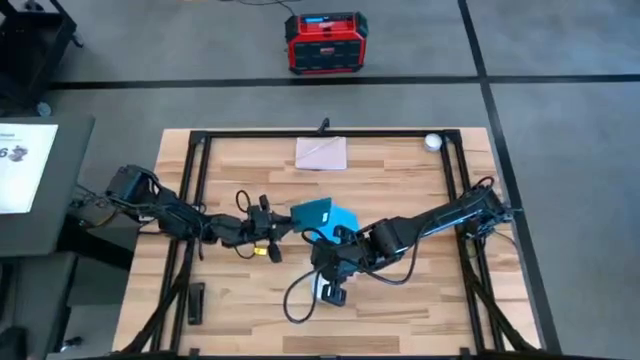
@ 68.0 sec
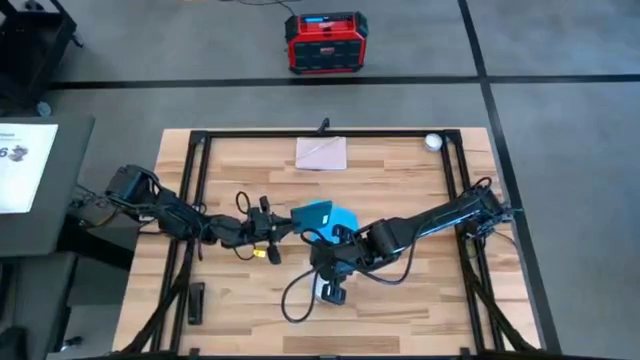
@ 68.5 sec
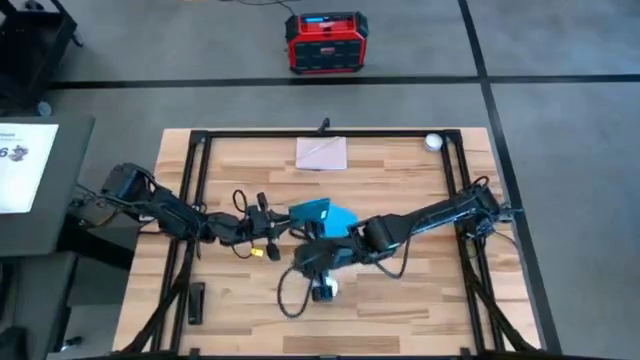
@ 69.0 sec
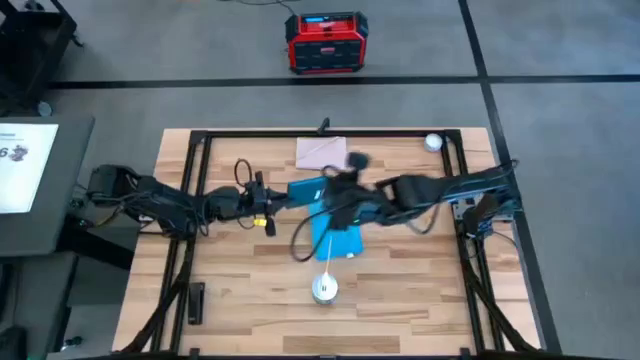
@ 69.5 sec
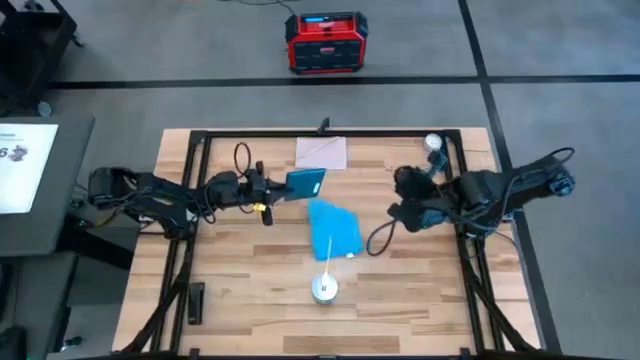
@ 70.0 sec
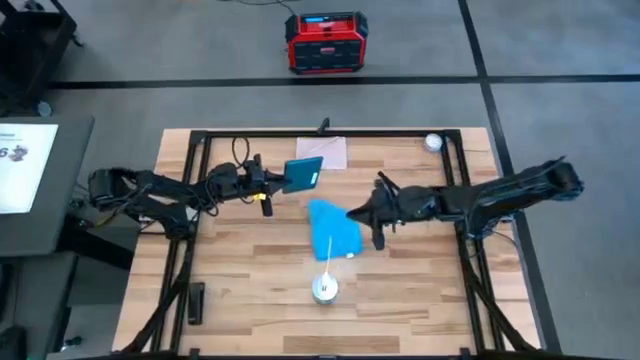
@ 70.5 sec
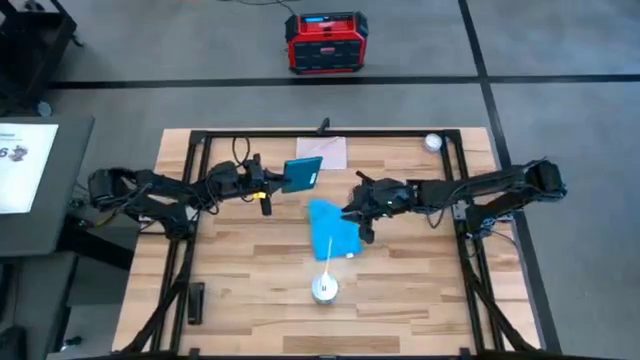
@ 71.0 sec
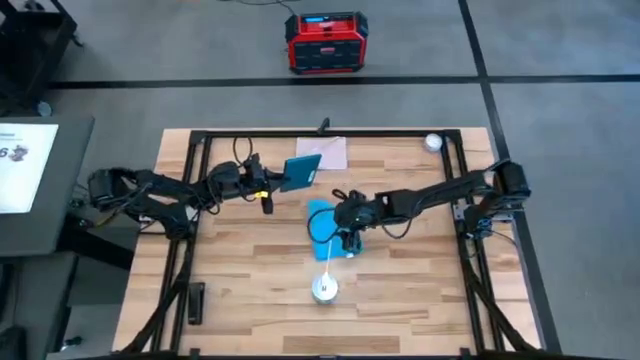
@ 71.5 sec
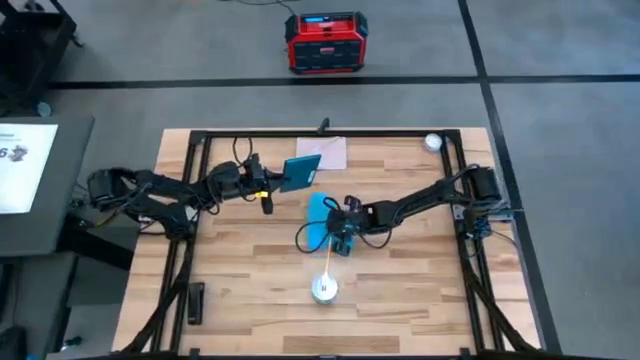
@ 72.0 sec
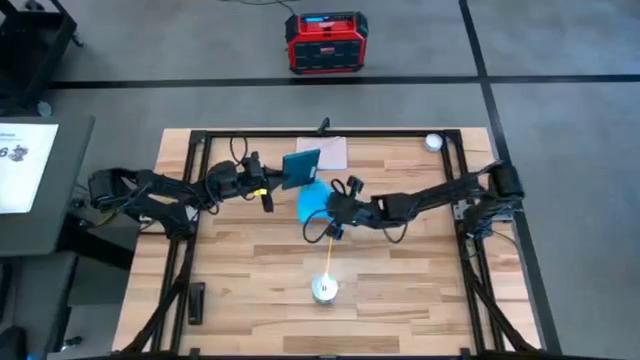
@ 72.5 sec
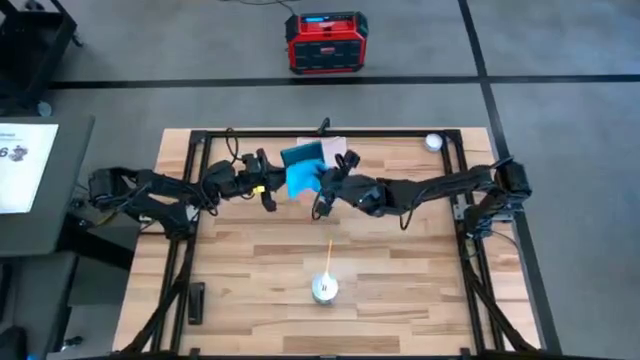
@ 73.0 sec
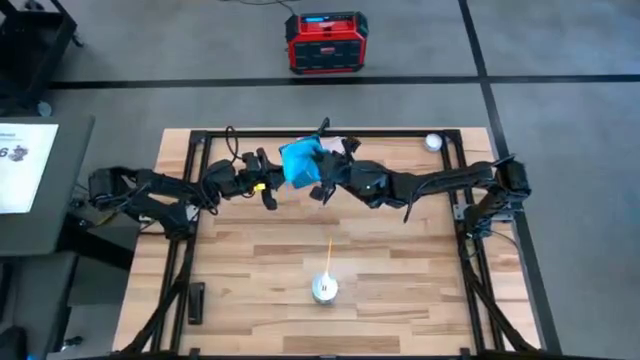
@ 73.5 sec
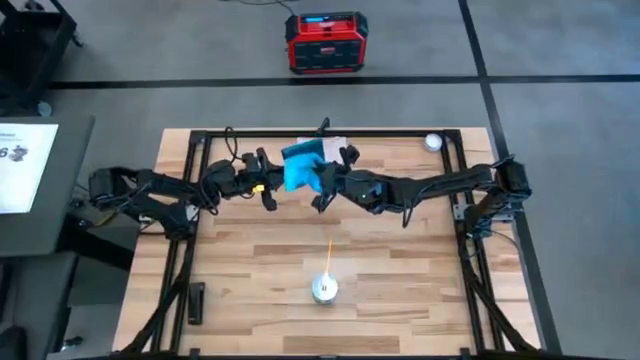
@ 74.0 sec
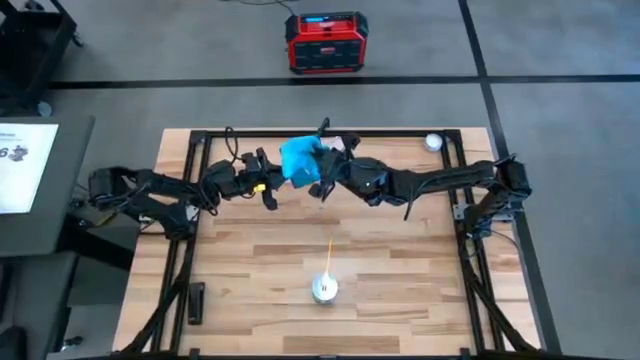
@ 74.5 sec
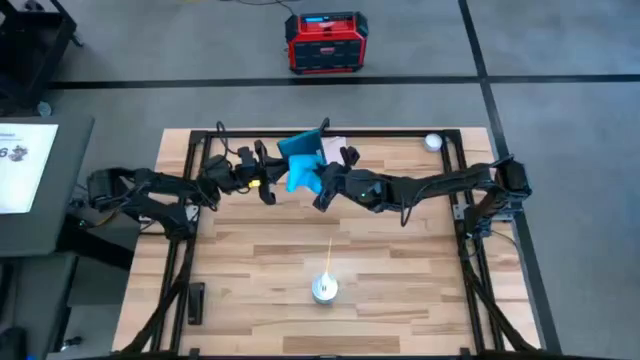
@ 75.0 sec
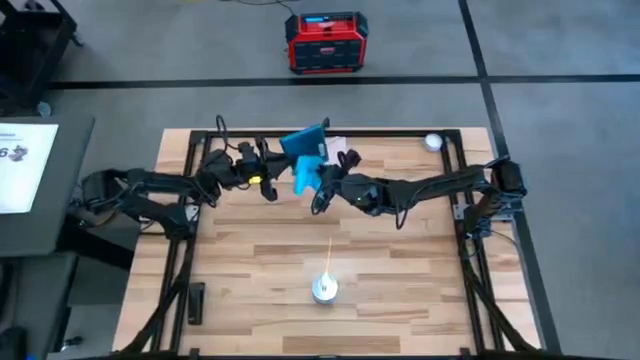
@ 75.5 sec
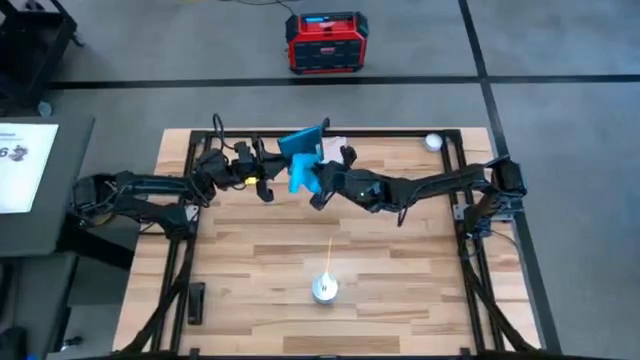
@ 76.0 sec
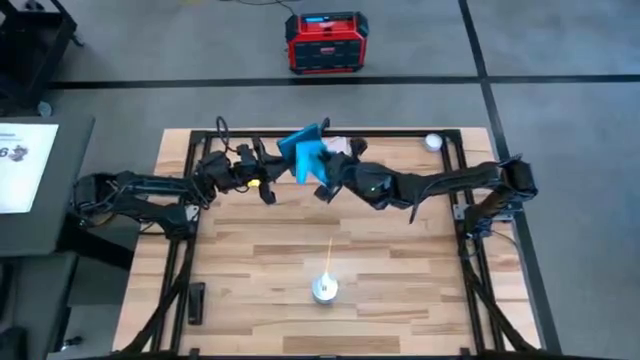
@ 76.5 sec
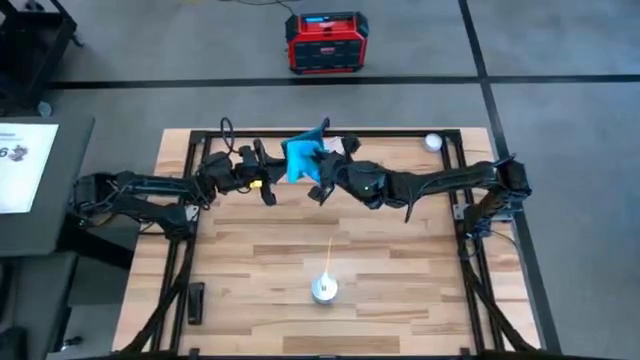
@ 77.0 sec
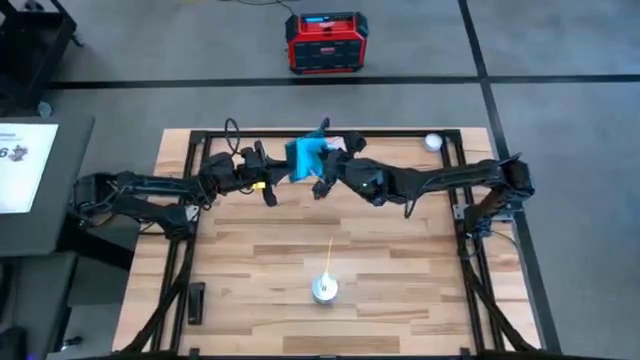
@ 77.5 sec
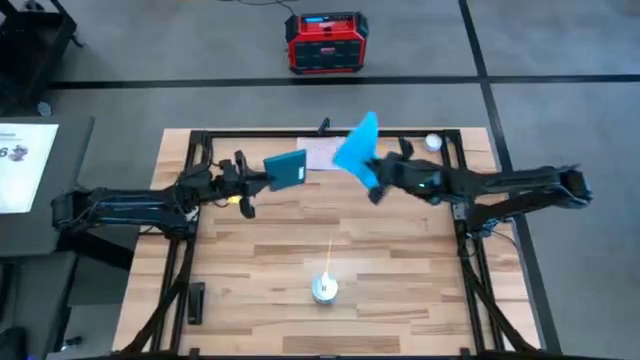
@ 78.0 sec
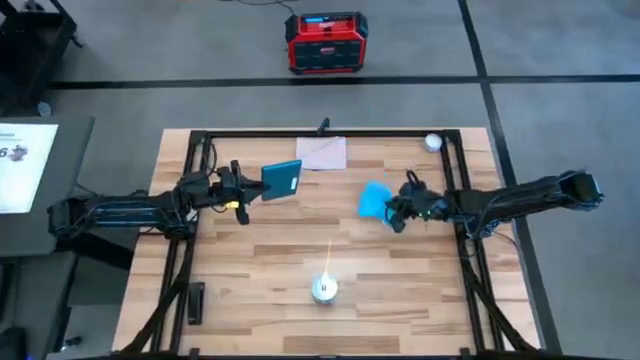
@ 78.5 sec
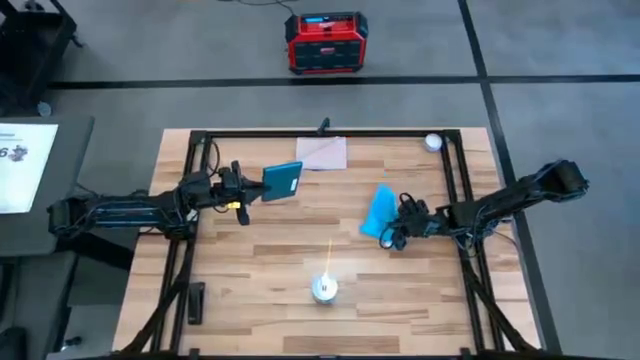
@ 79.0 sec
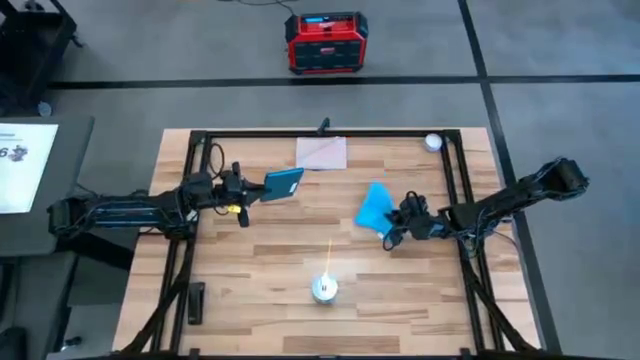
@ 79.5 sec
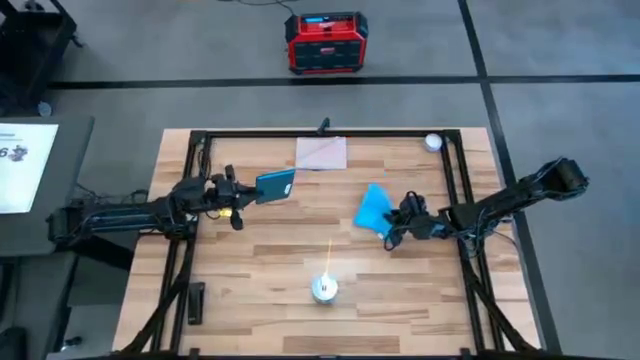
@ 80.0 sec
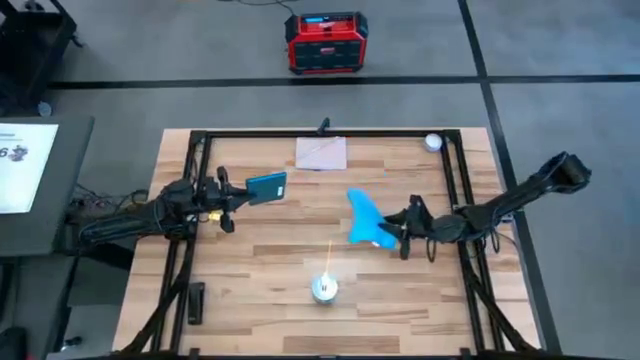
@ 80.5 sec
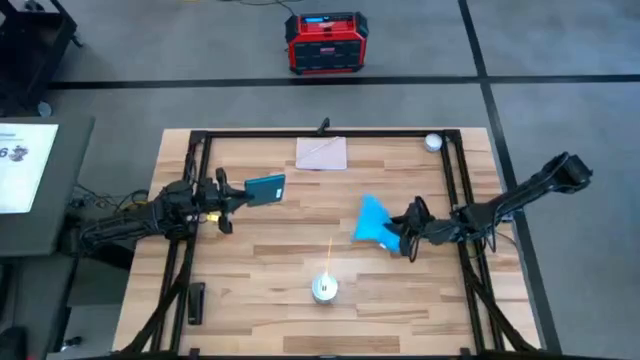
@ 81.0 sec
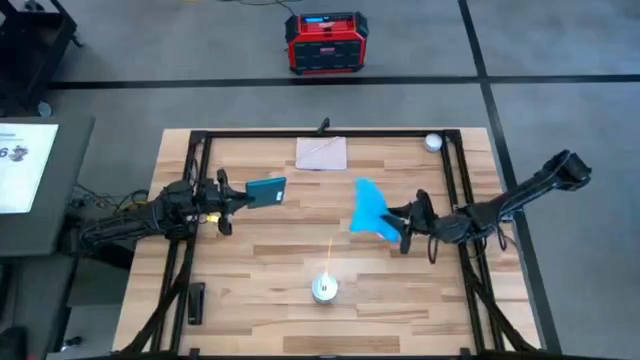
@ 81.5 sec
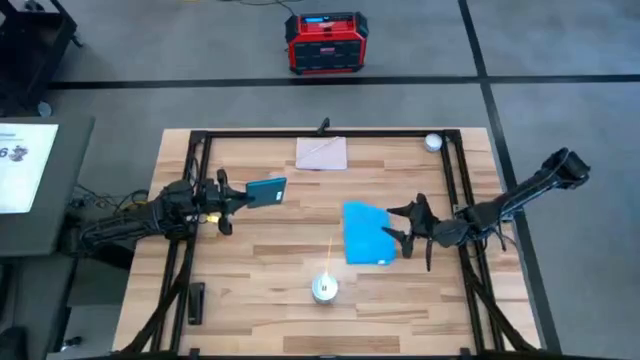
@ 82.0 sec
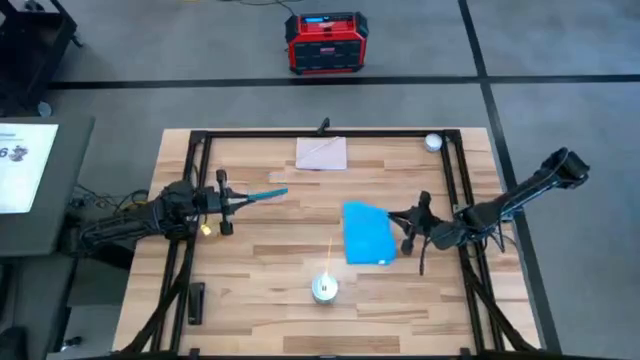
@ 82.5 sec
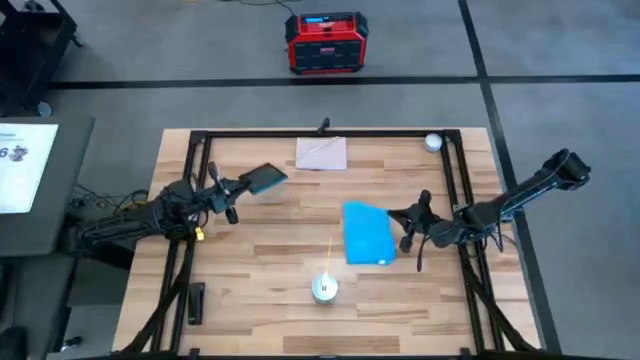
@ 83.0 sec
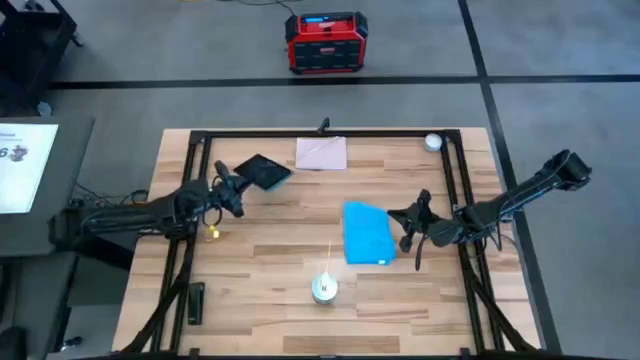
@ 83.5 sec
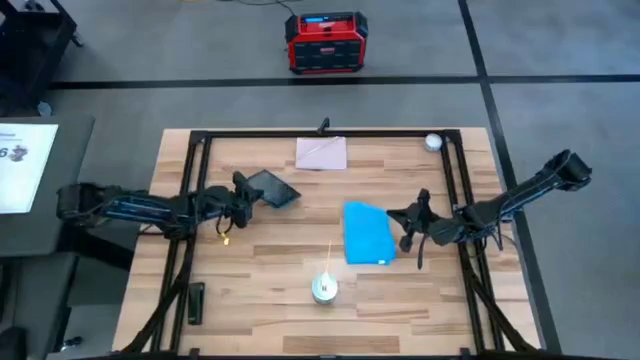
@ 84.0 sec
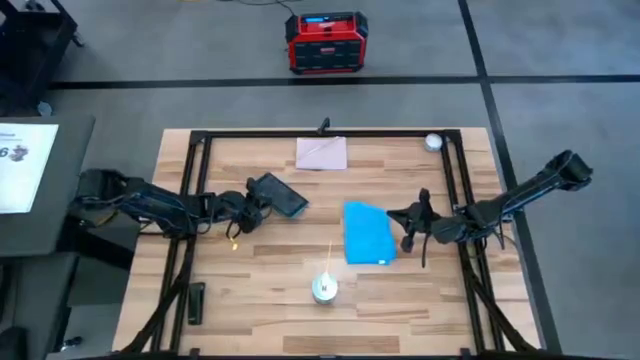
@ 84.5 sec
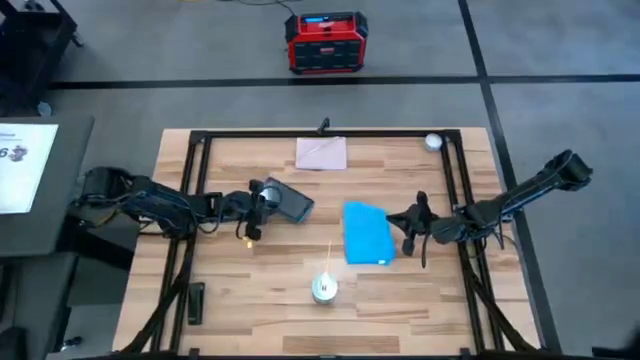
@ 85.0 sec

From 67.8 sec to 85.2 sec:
Task: Apply microfiber cloth
Wipe the back of the tablet with a blue microfiber cloth

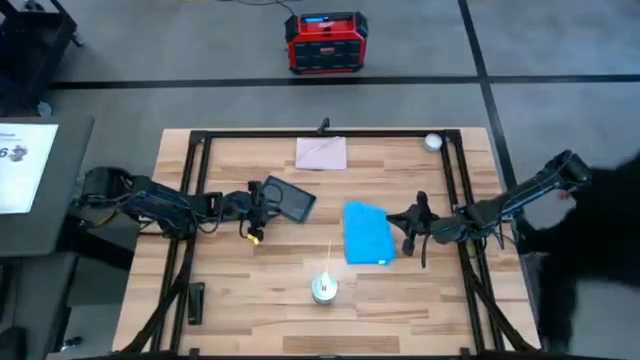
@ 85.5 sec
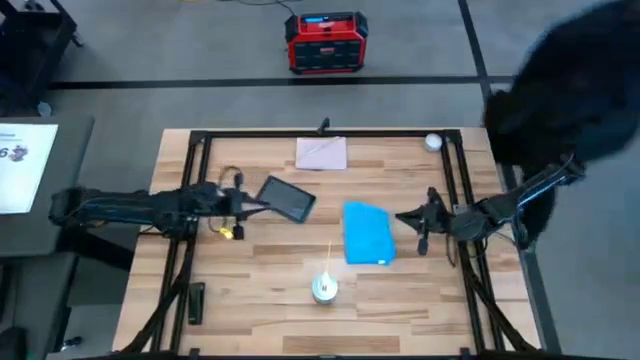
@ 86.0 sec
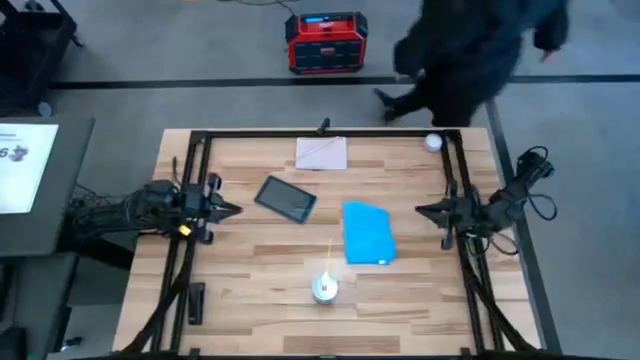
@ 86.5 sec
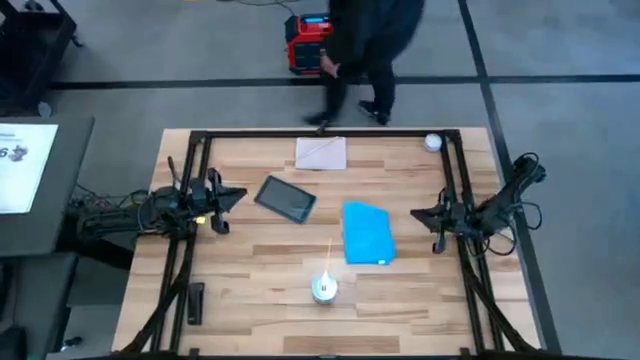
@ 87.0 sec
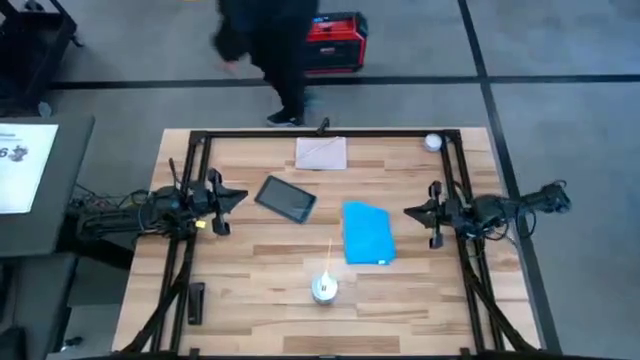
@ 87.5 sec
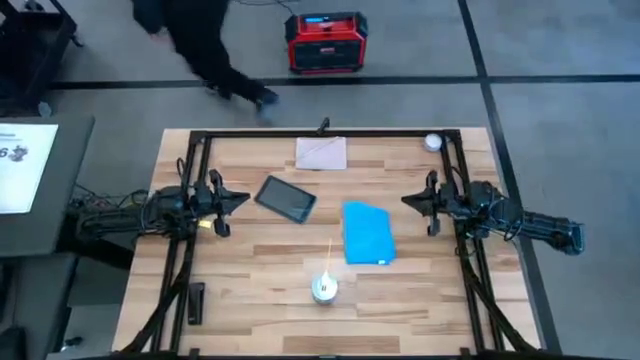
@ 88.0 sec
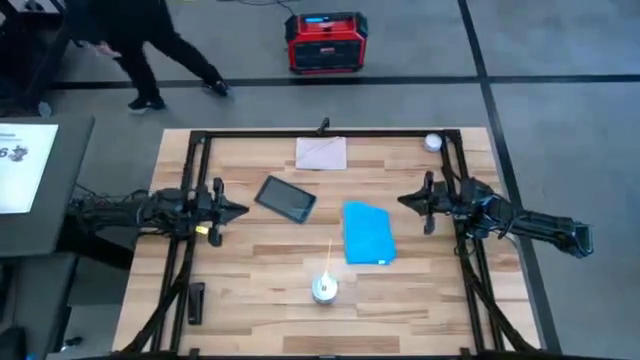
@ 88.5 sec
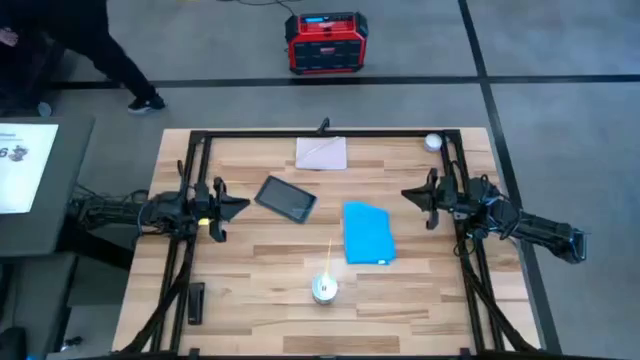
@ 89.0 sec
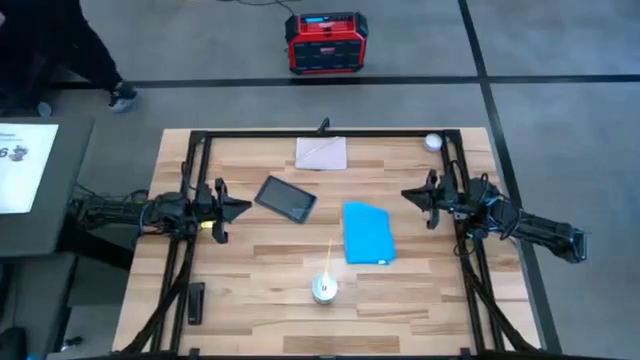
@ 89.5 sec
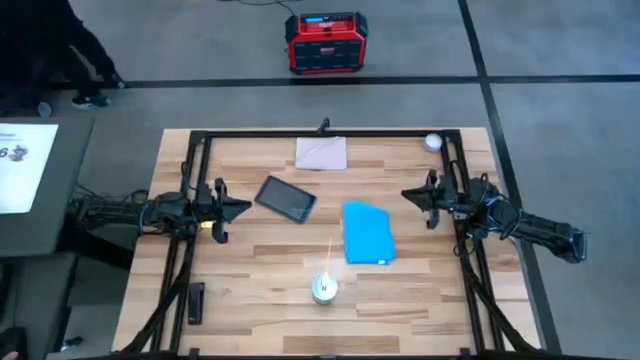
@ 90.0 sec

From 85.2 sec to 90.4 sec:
Return to Home Position
